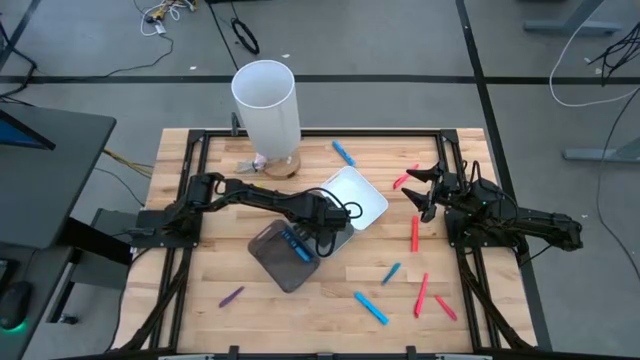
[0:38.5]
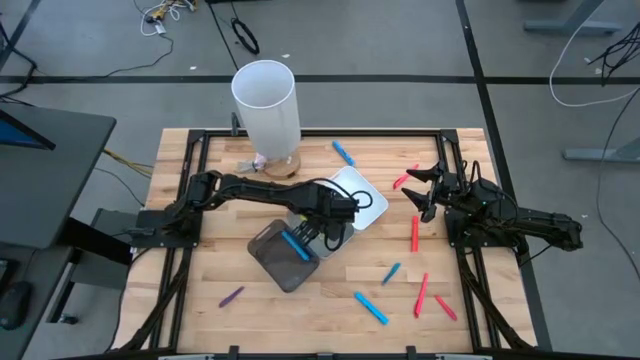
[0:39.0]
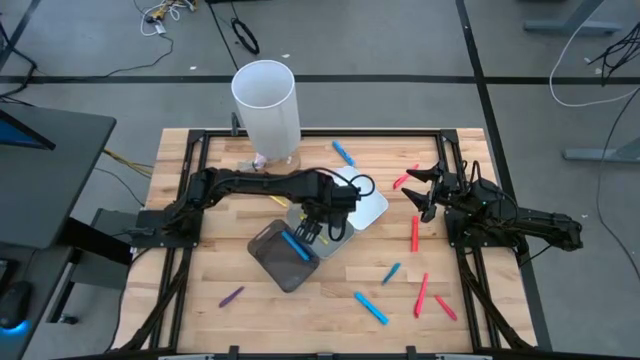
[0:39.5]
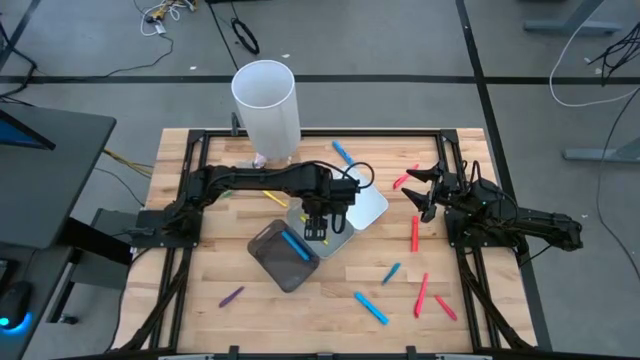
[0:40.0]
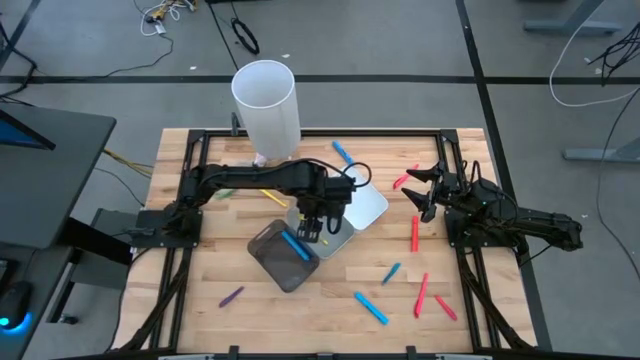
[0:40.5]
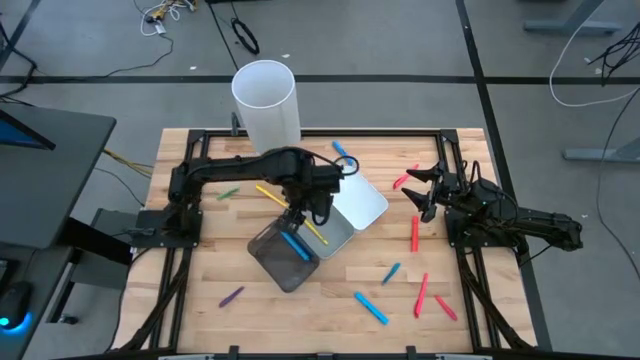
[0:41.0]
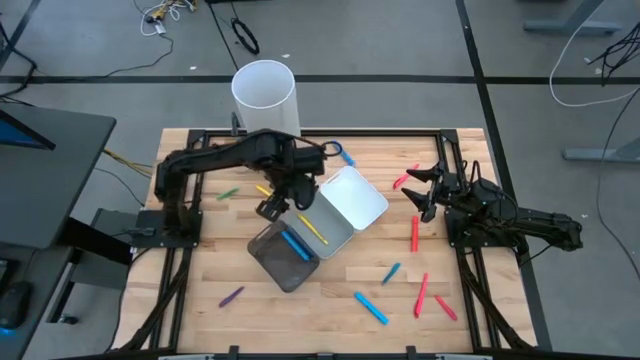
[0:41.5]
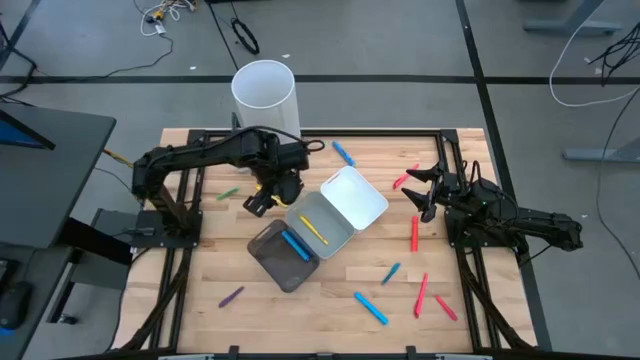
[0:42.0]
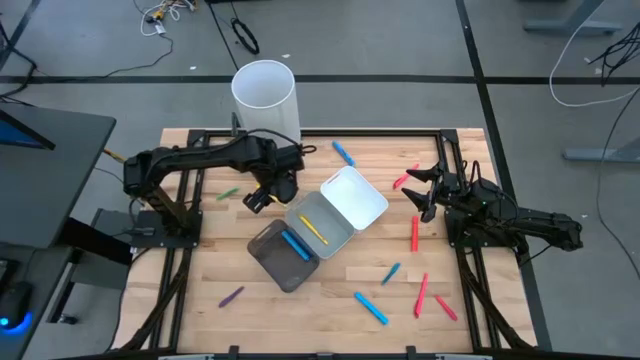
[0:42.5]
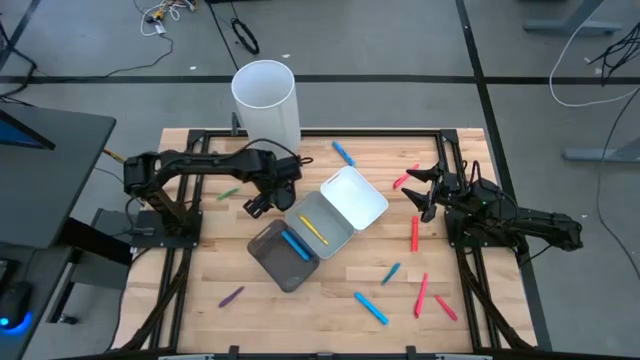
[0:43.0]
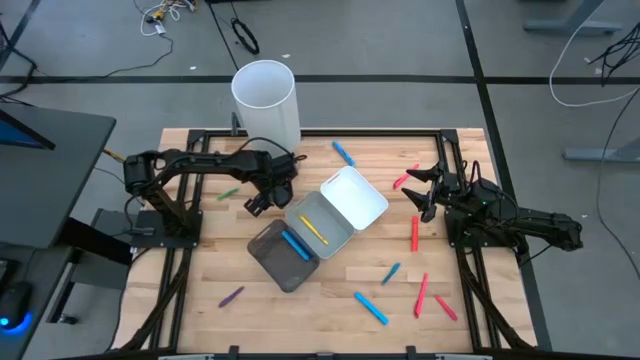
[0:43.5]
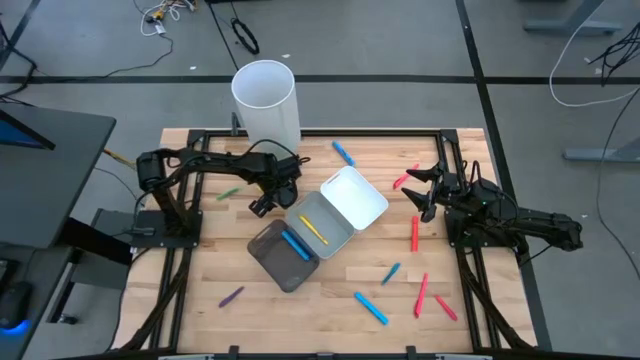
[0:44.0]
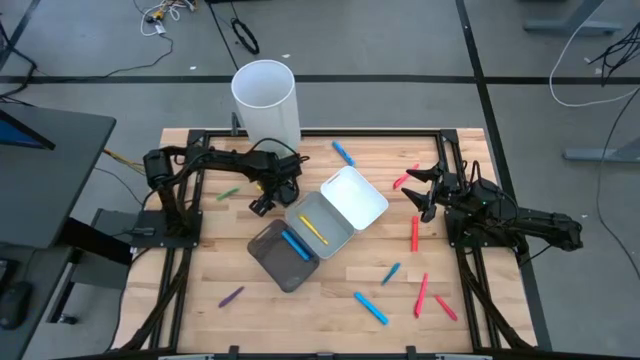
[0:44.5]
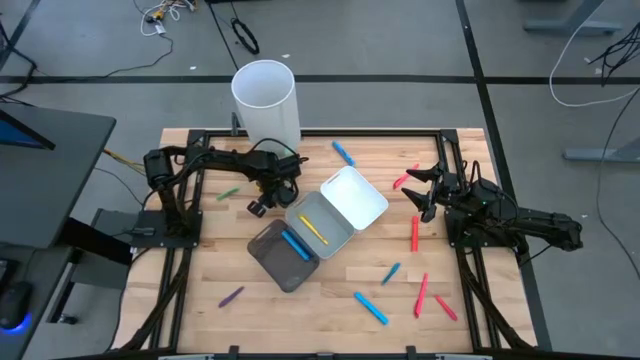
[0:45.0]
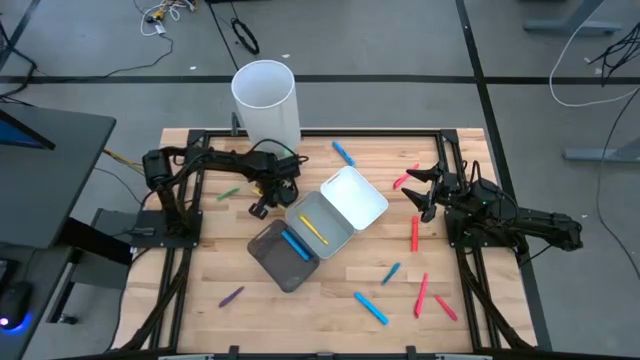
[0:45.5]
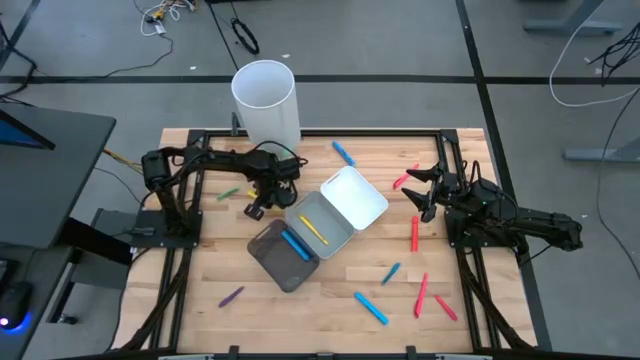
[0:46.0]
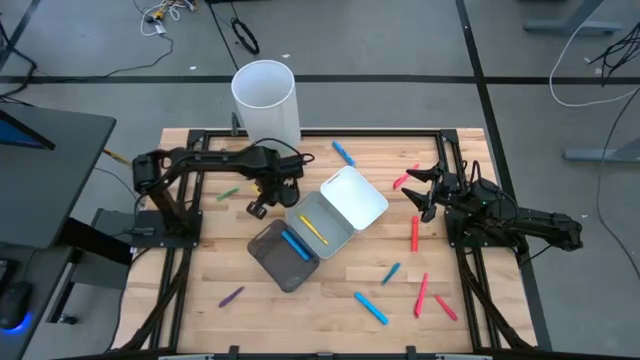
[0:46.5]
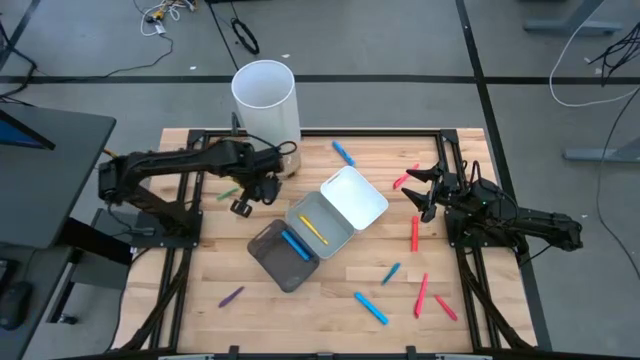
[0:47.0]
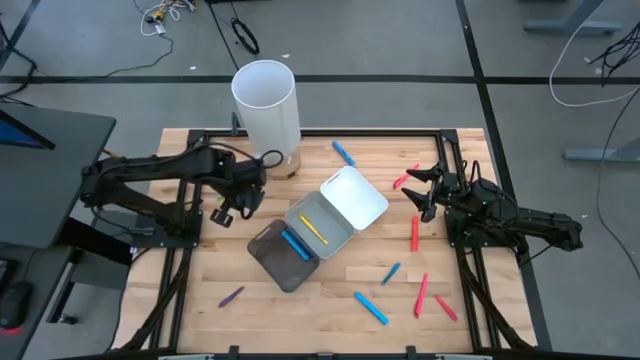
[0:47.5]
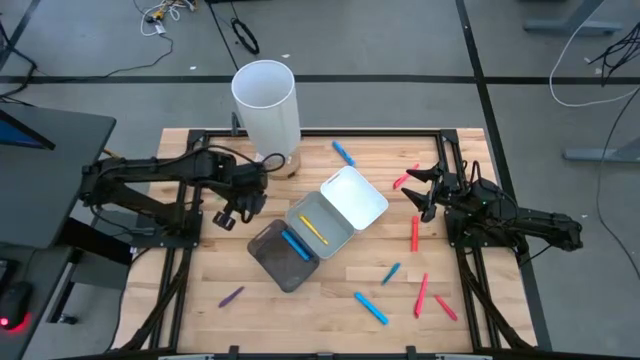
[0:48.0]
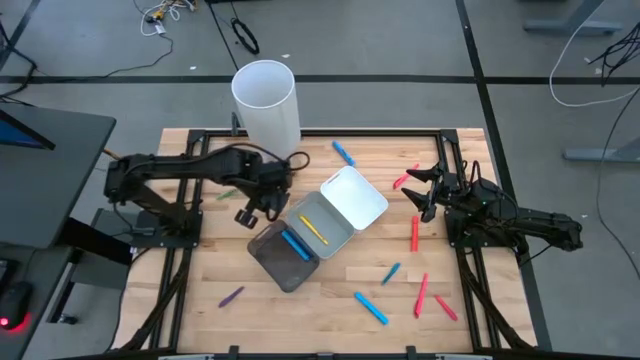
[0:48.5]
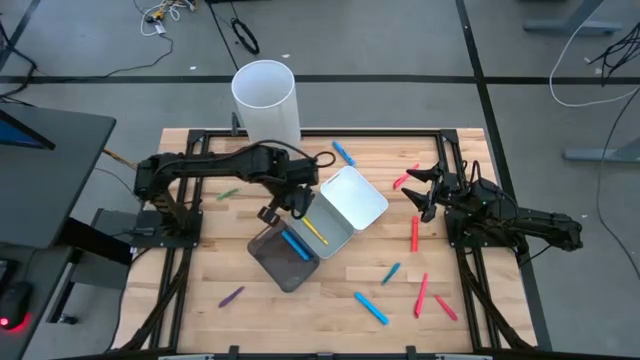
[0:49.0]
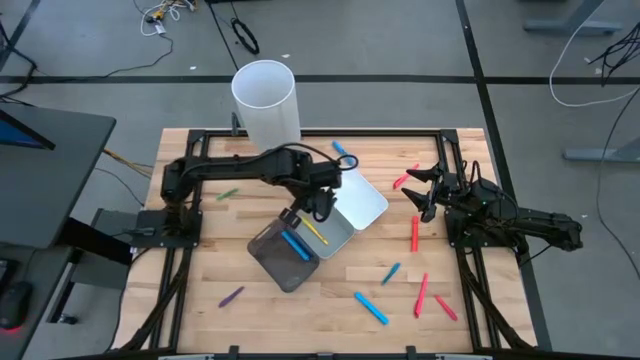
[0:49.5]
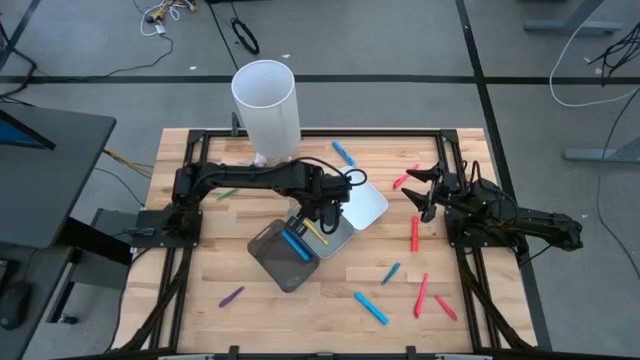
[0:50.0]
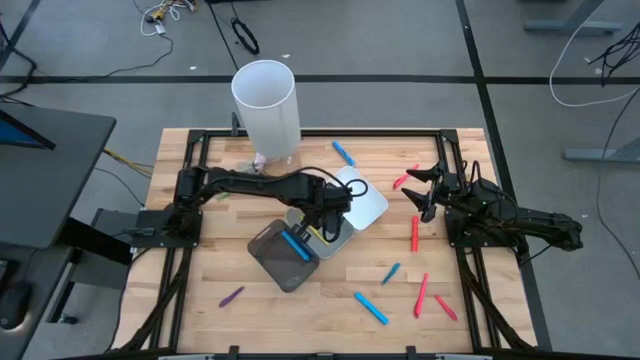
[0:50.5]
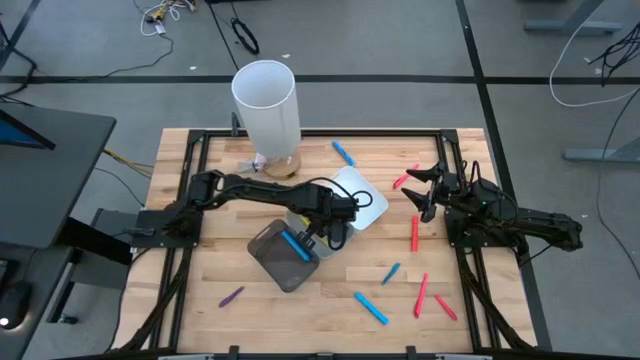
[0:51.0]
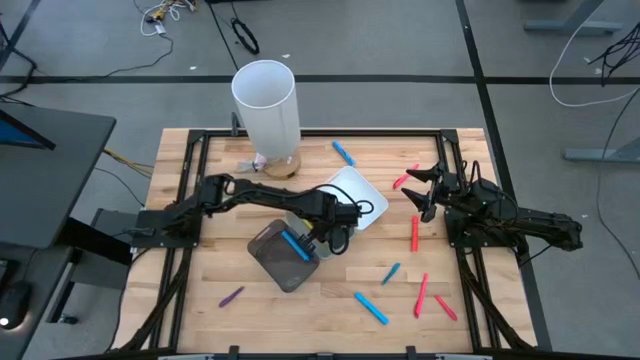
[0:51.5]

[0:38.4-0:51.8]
Task: Pick & Place Markers
Put the yellow marker into the gray bin

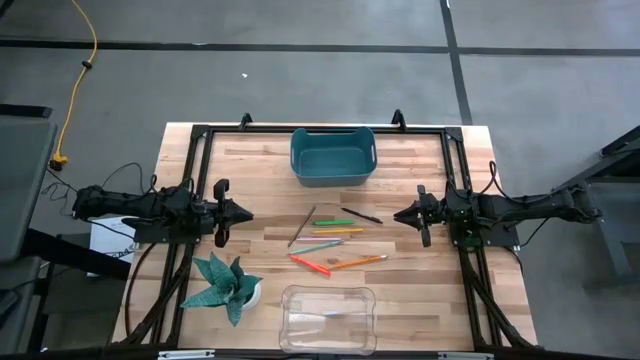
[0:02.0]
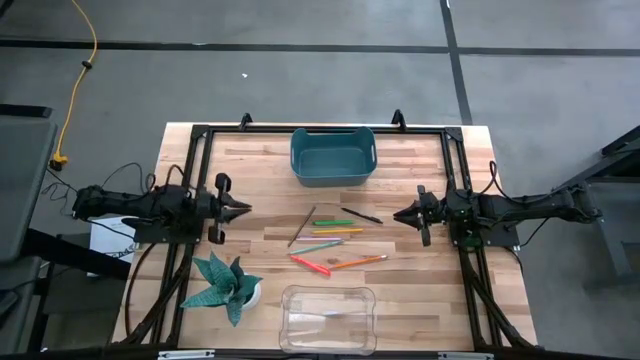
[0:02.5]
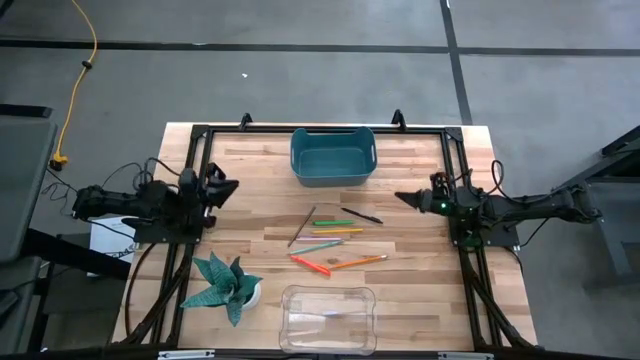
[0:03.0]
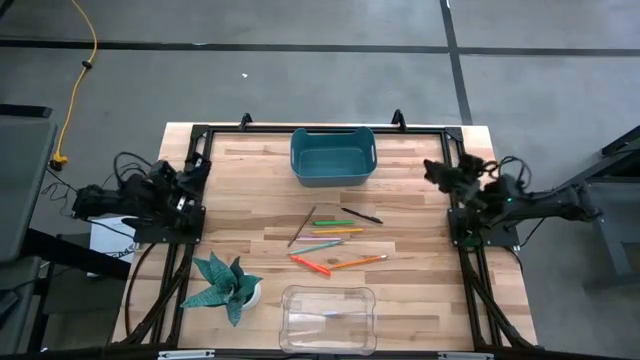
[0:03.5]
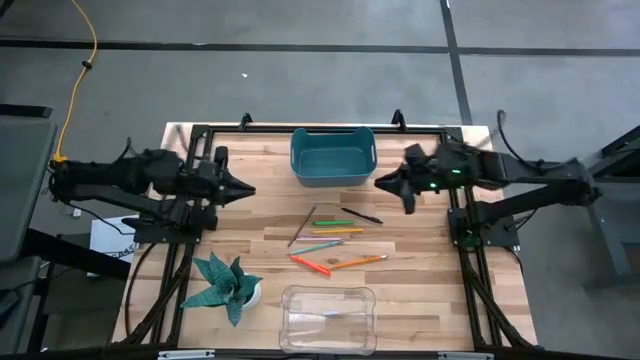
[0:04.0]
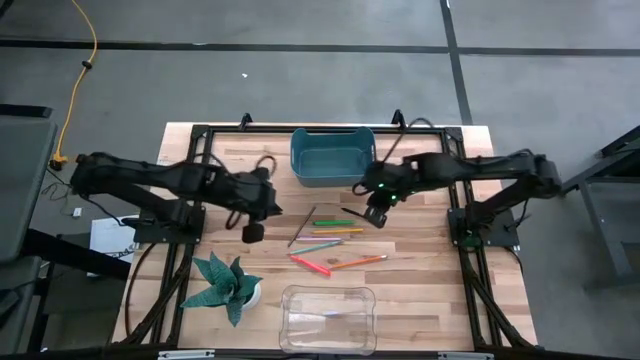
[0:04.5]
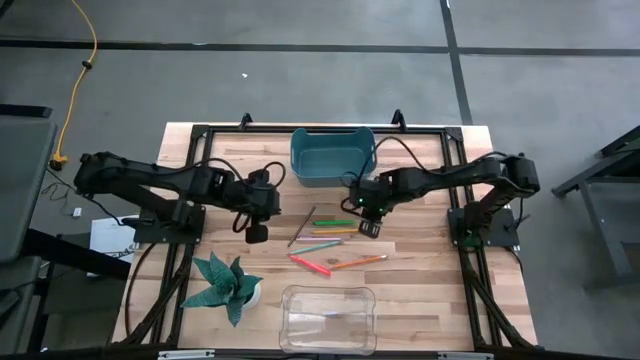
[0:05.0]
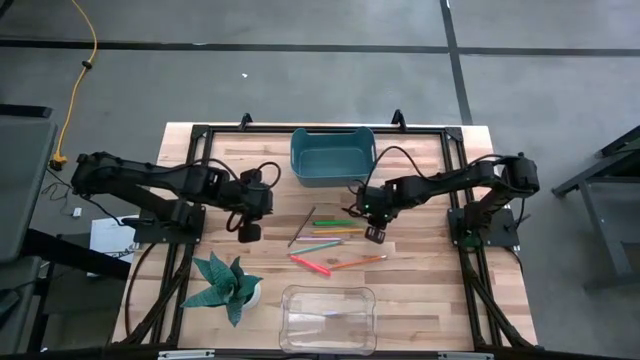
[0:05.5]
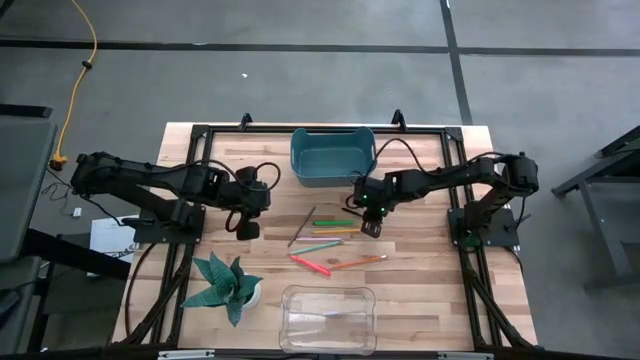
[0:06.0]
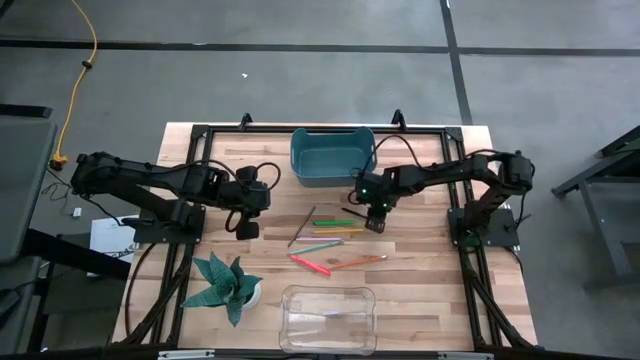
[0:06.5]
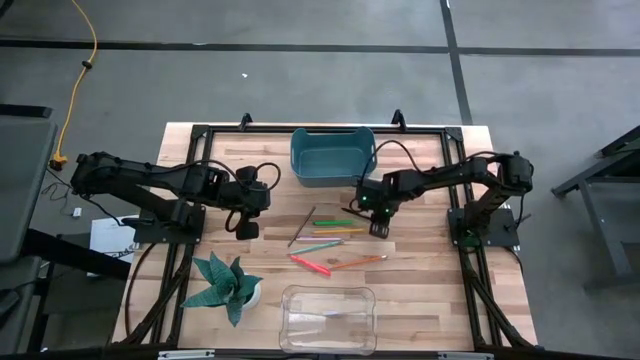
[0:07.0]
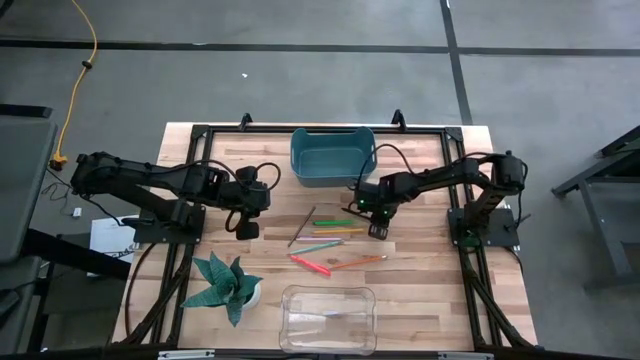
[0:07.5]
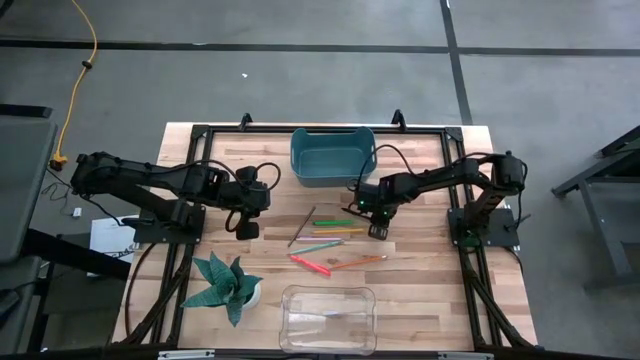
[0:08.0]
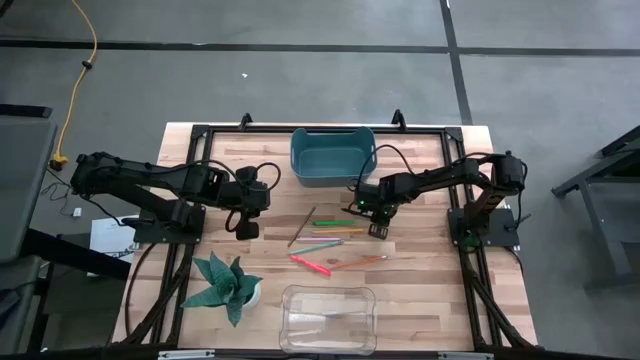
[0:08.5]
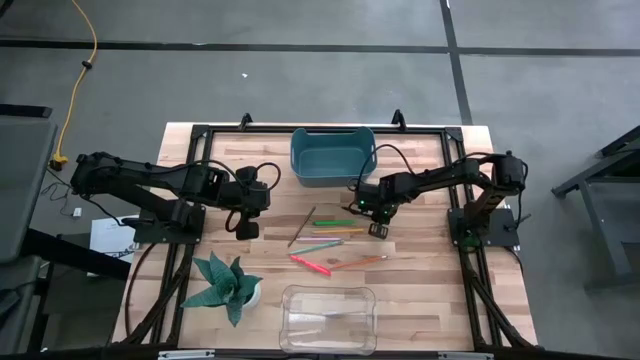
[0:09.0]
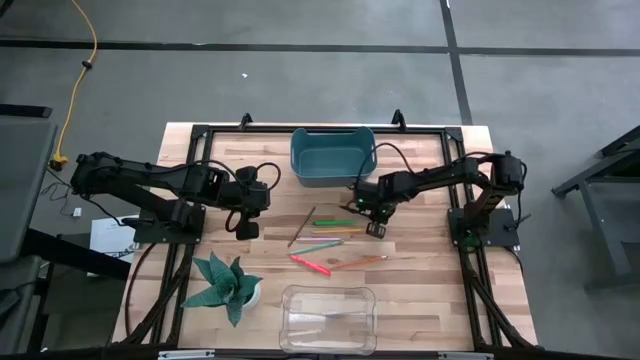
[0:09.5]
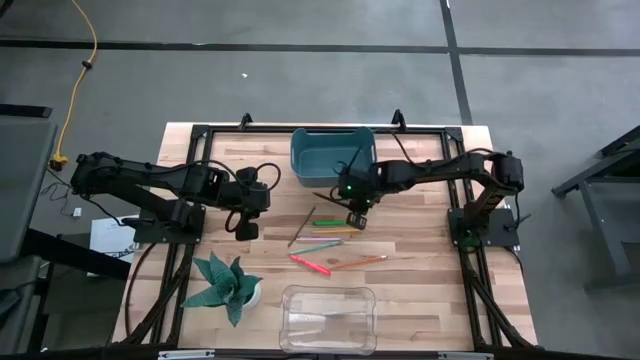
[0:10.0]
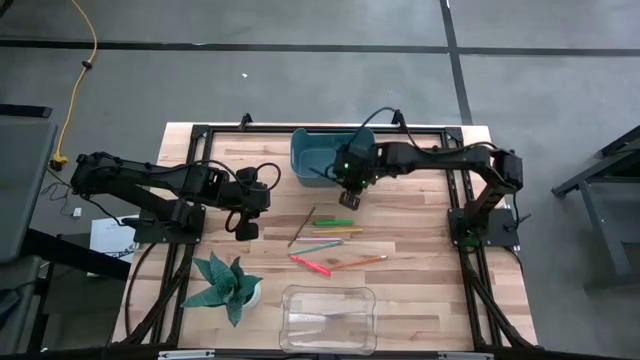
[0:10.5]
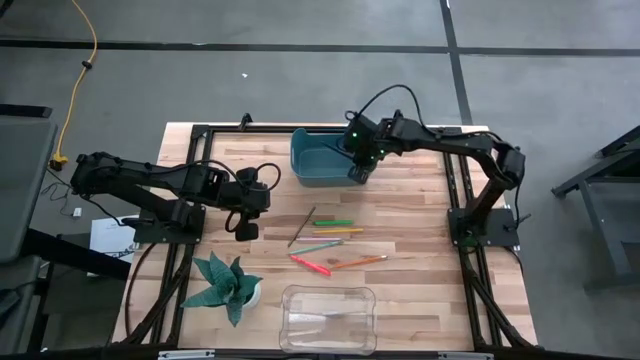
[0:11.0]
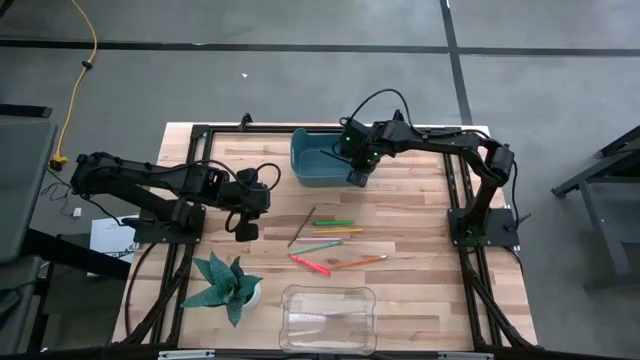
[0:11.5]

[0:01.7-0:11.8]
Task: Sort pens & pencils
Put the black pen into the dark blue bin
